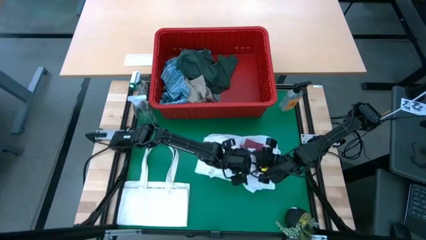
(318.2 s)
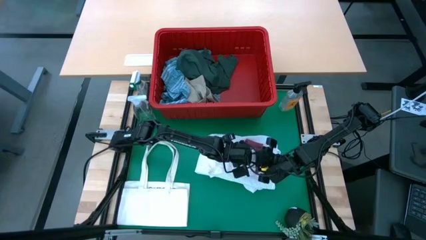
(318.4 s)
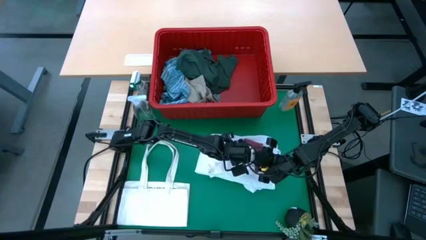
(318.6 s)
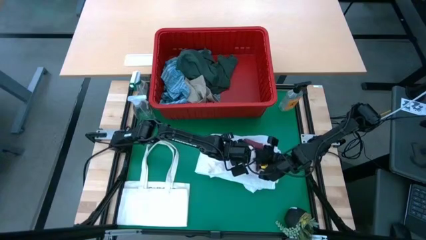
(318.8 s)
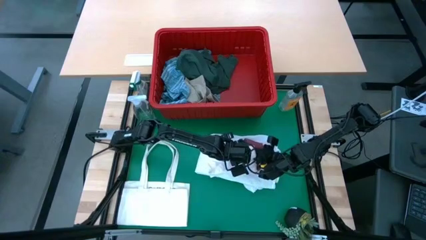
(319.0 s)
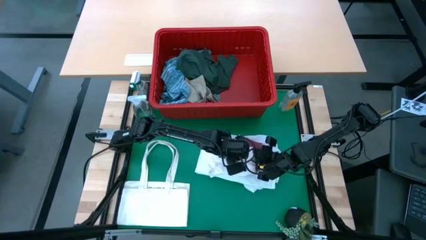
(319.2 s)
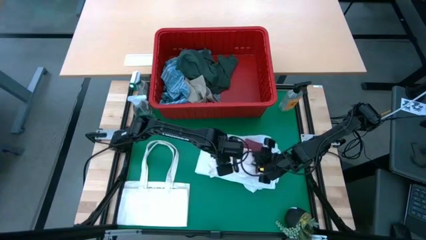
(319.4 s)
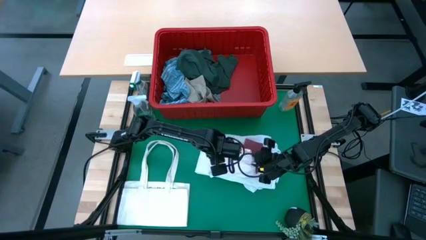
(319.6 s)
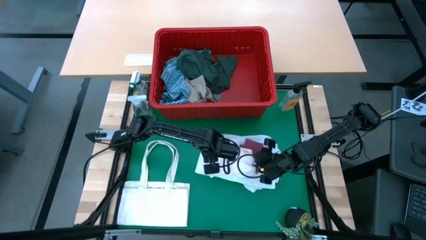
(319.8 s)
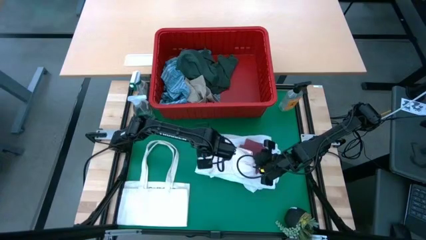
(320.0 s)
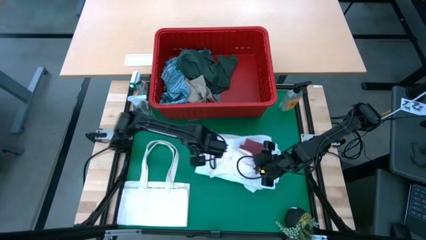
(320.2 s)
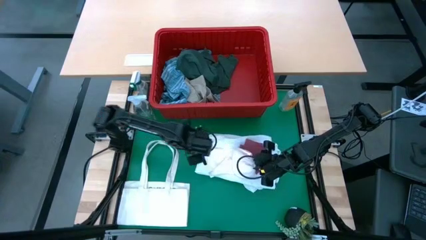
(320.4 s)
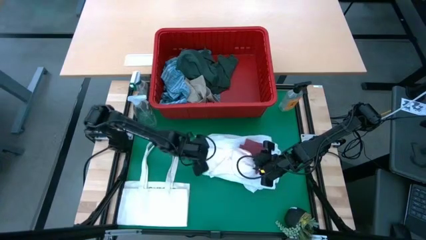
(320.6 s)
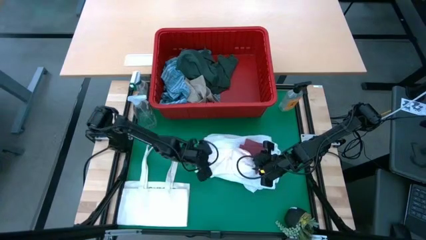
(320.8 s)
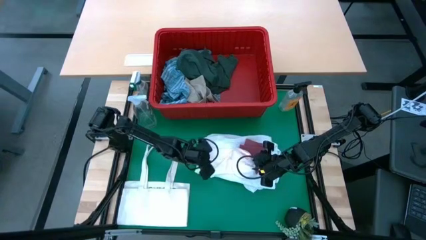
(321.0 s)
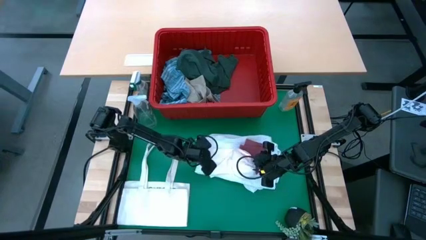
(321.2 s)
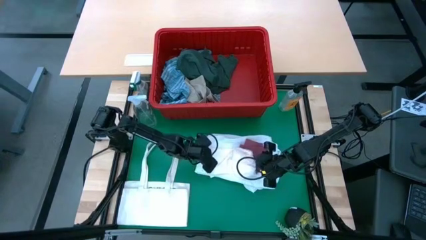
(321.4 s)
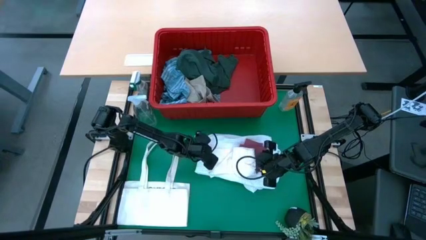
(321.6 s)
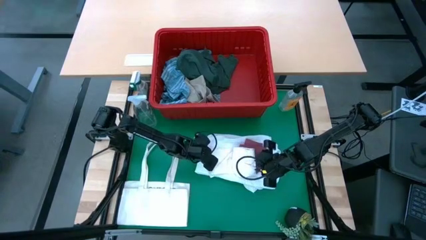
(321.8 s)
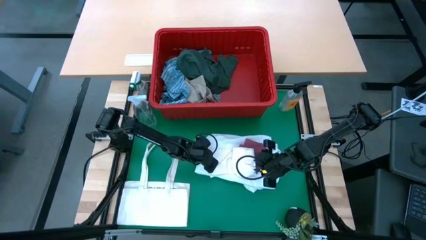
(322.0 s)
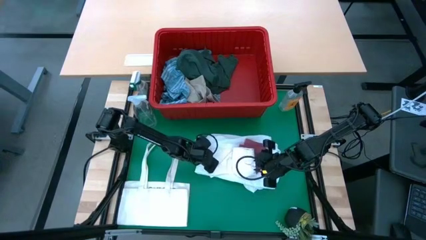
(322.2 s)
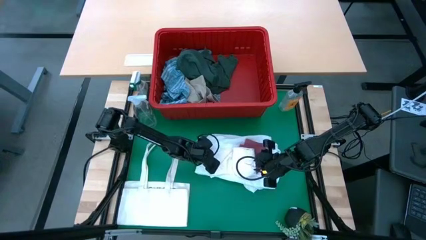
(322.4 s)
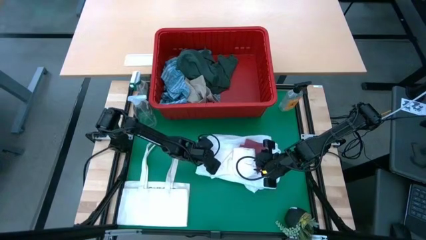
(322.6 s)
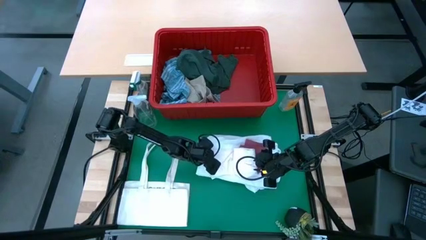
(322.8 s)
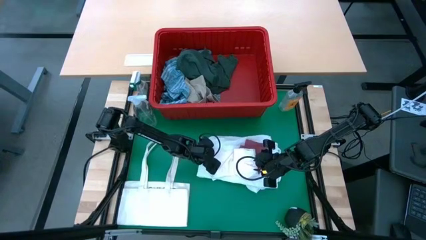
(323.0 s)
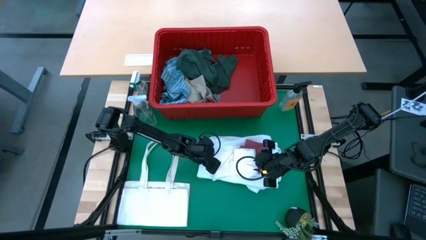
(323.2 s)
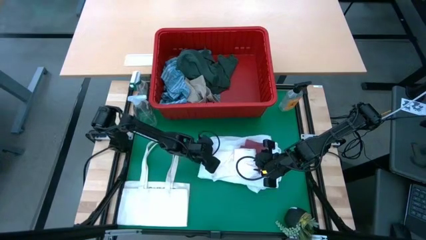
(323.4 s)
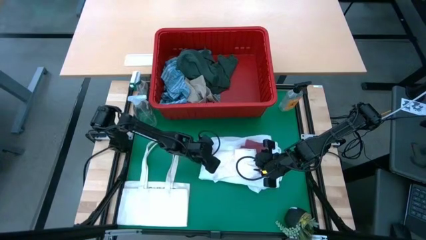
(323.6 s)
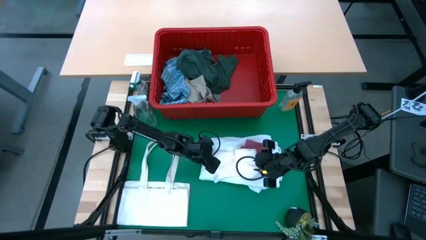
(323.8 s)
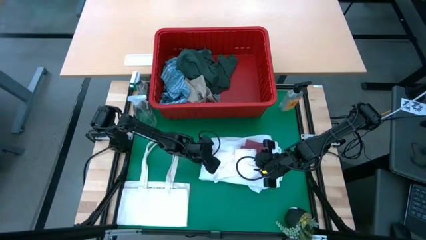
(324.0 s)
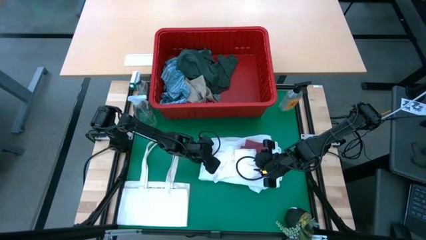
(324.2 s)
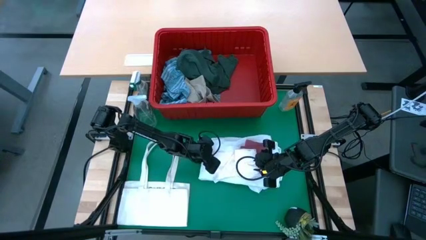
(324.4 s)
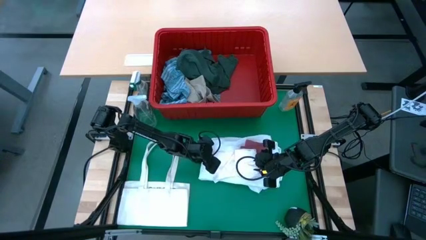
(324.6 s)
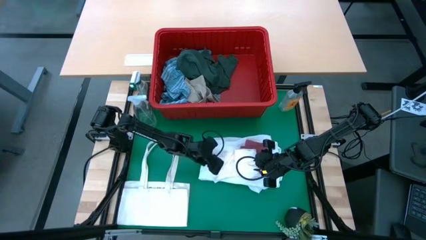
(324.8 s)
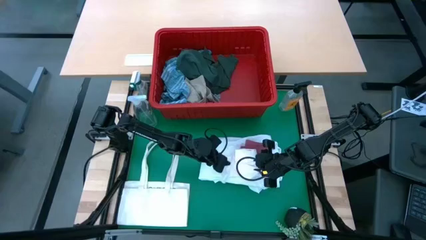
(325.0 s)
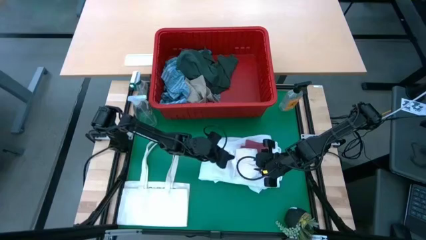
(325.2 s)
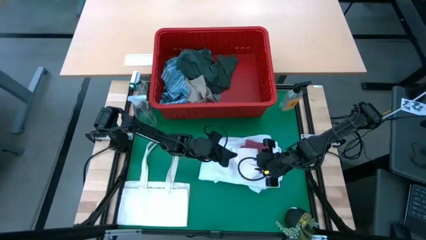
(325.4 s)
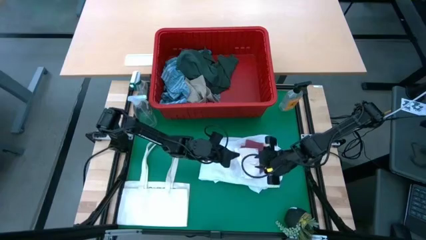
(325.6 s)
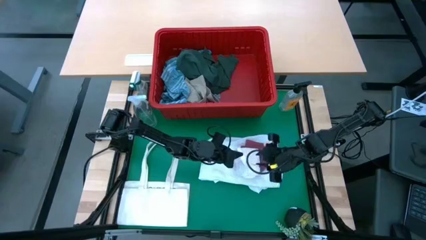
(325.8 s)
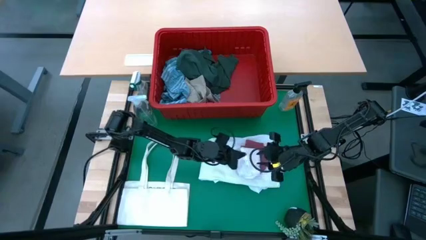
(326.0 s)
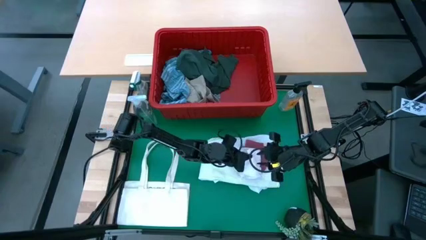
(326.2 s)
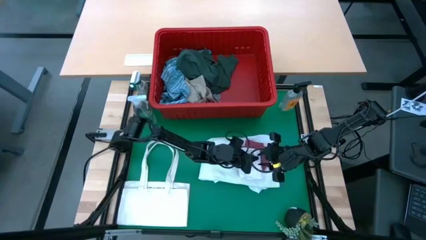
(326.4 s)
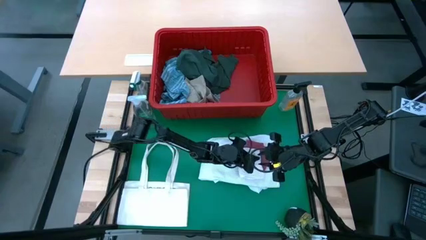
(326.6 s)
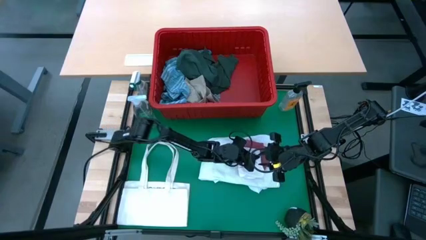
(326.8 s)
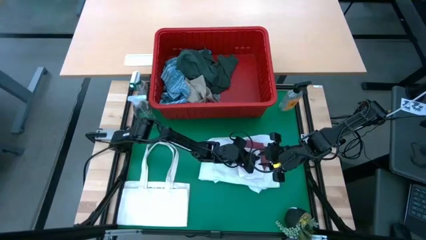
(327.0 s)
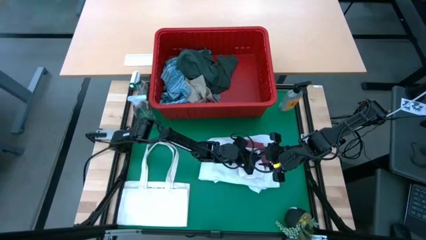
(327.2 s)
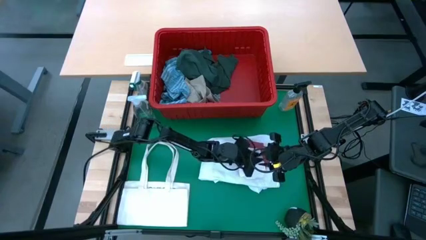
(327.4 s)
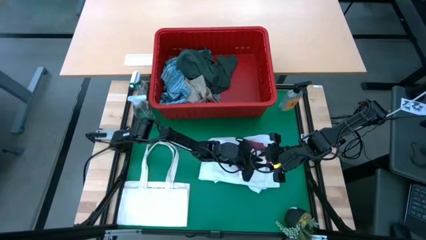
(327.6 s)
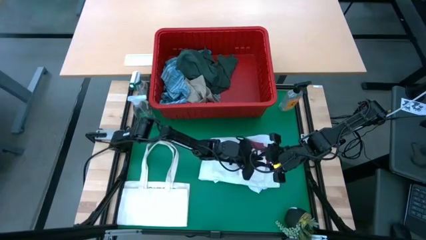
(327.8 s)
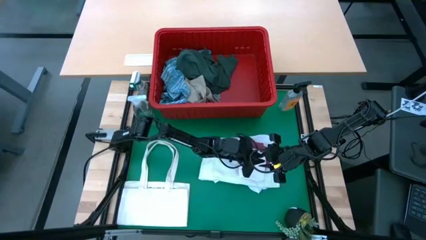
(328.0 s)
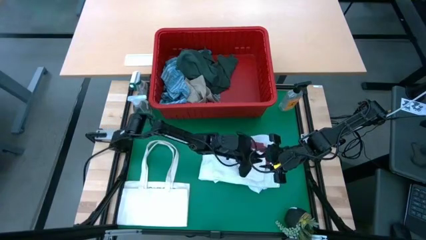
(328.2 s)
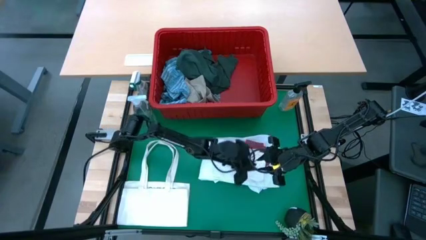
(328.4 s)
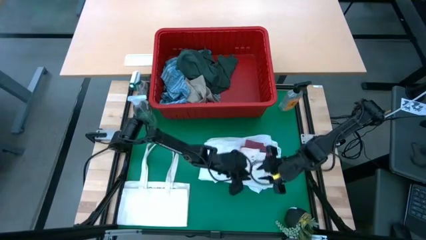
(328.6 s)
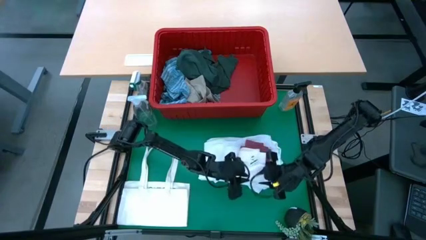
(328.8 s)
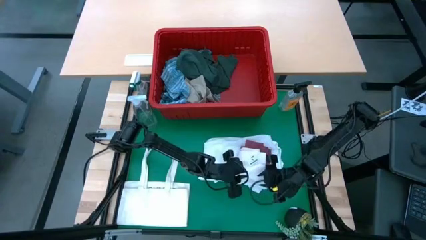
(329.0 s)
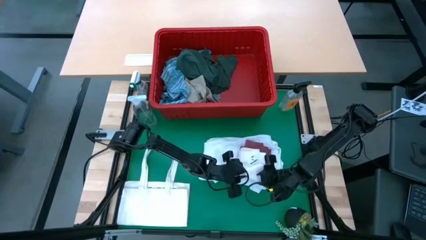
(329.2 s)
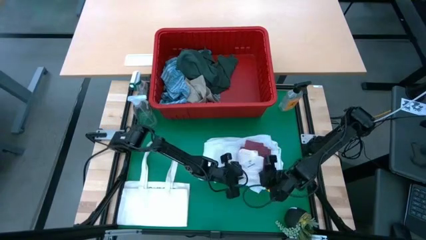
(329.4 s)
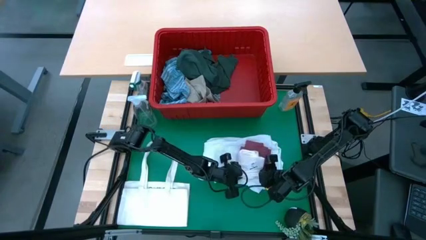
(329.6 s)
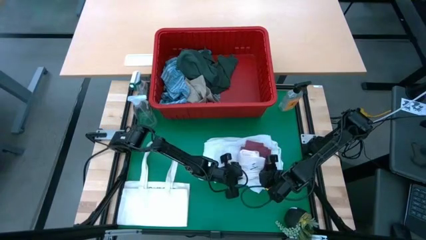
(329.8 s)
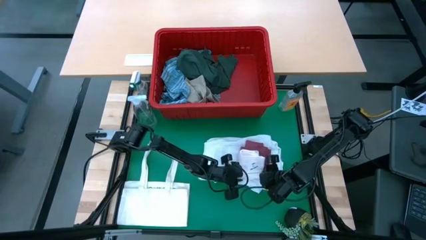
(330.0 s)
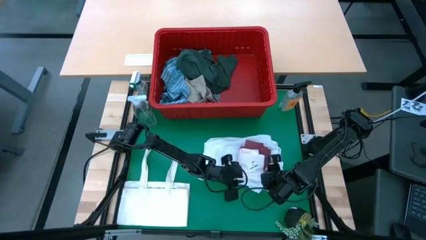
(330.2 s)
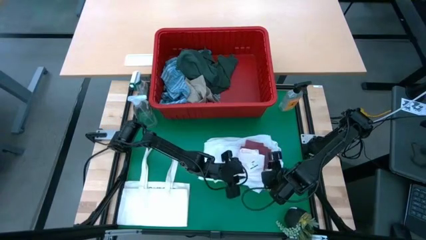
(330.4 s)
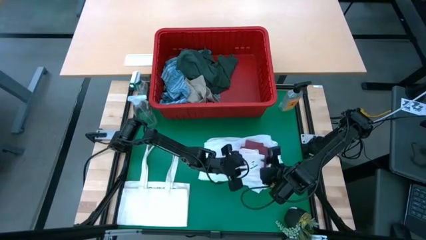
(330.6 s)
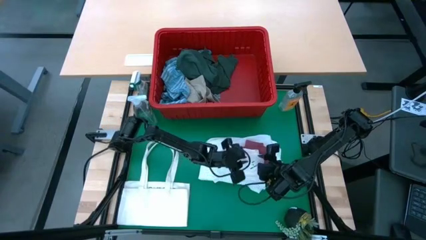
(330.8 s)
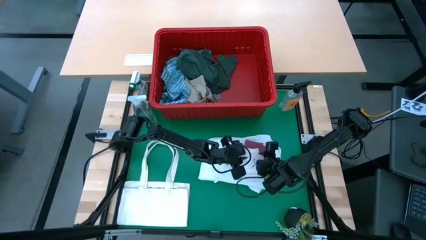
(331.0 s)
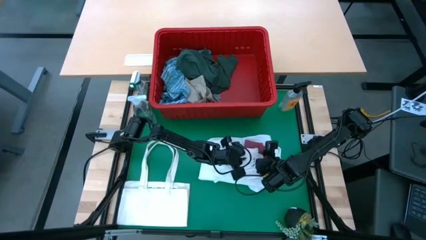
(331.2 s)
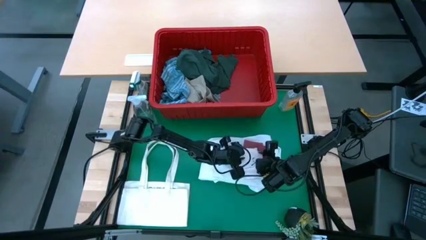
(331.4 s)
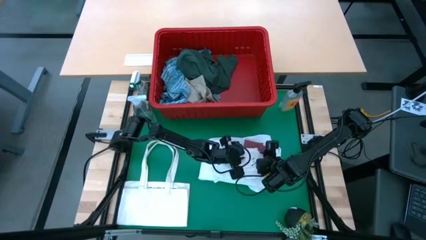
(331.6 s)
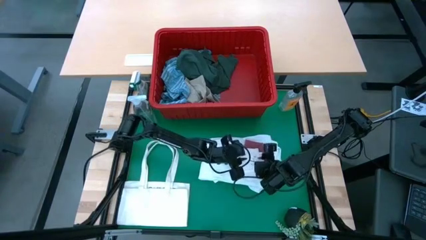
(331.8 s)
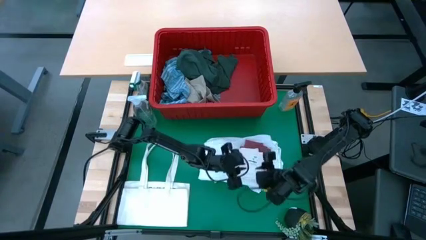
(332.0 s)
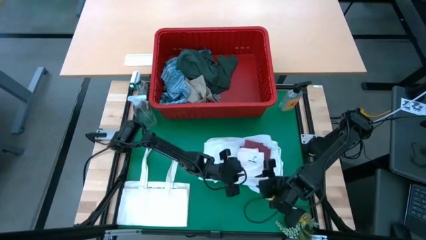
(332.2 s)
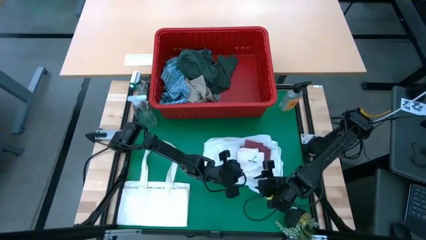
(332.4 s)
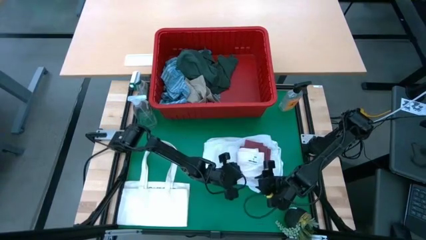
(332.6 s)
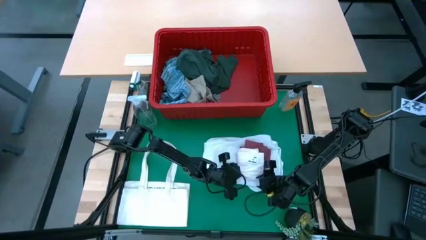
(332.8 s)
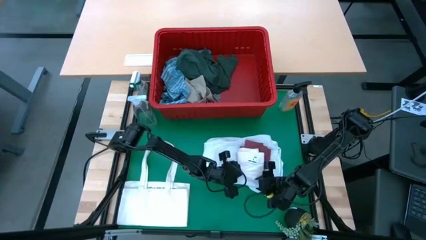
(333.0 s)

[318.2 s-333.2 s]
Task: Fold Laundry from Bin
Fold the white underwear
